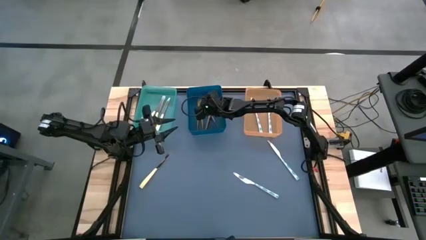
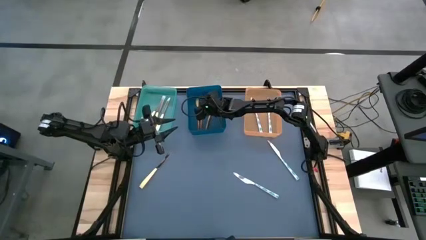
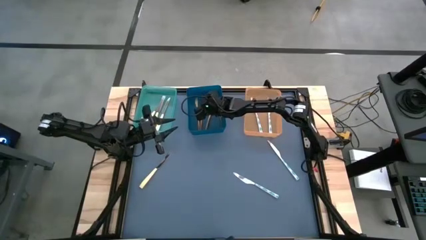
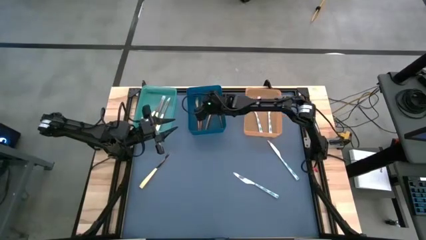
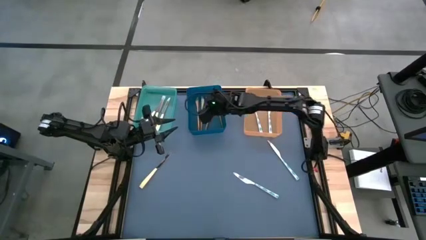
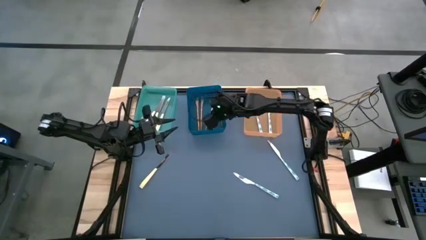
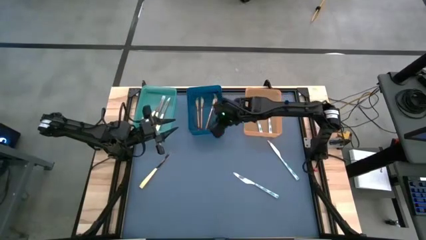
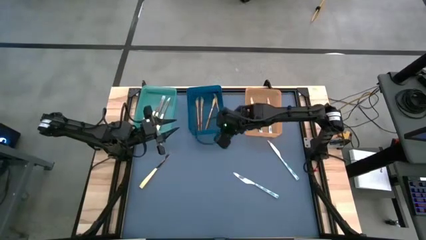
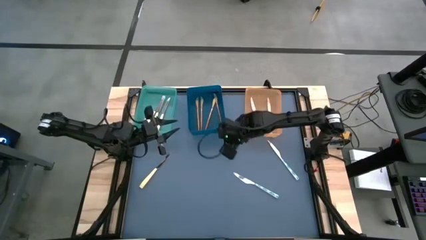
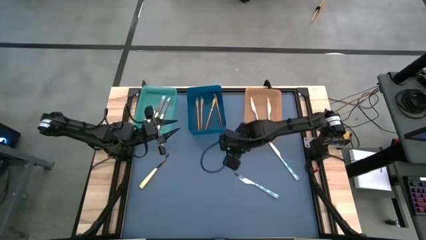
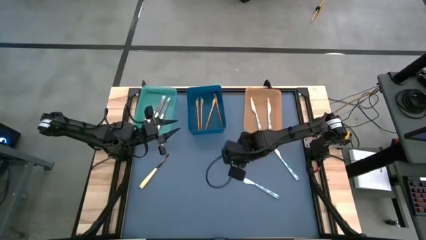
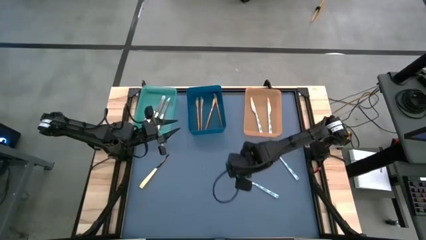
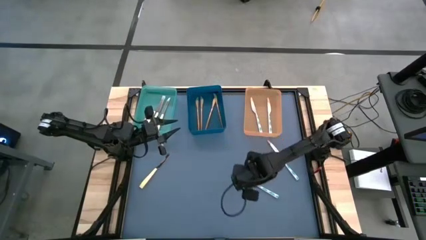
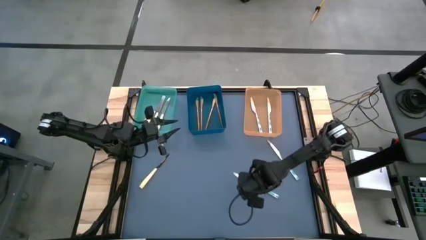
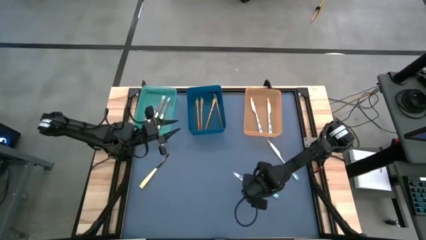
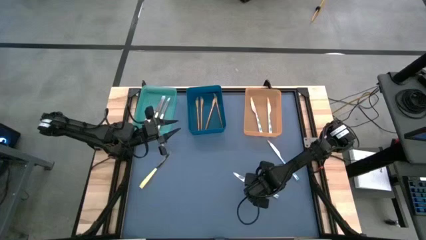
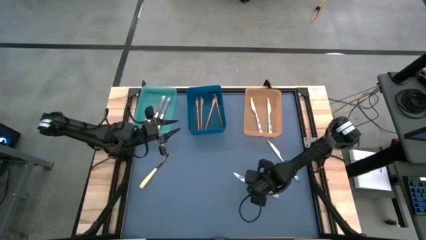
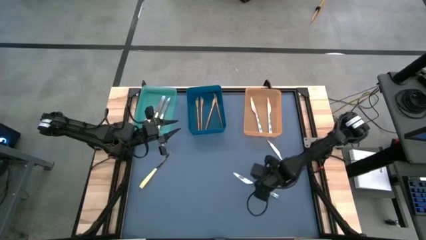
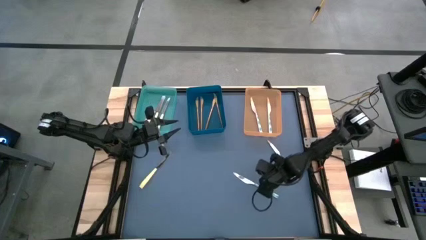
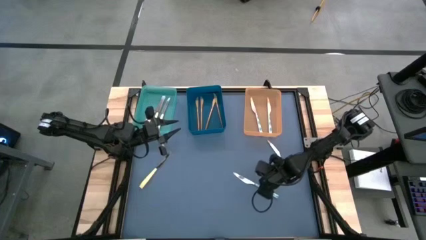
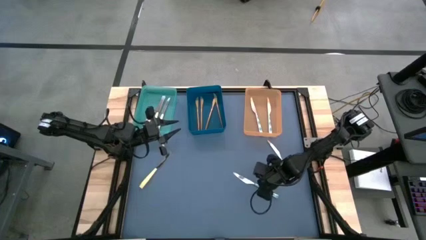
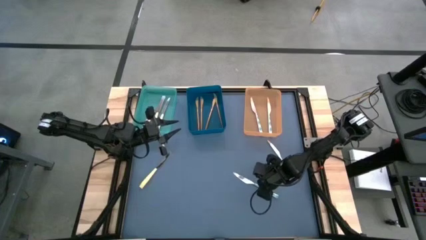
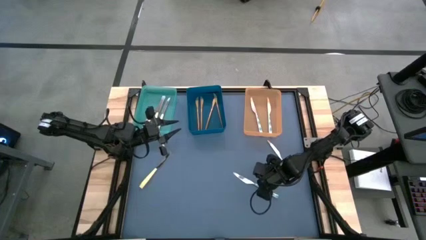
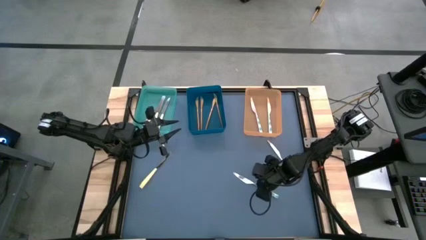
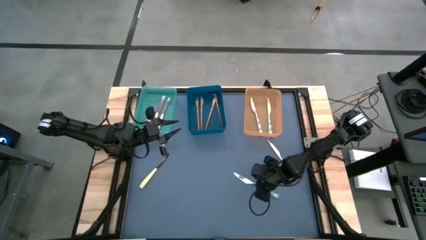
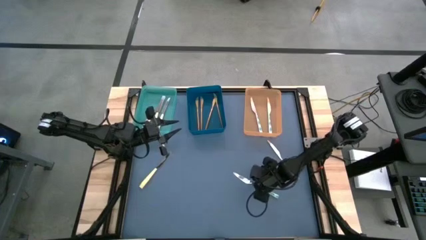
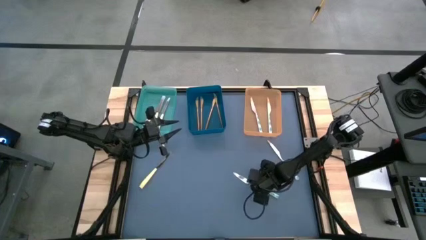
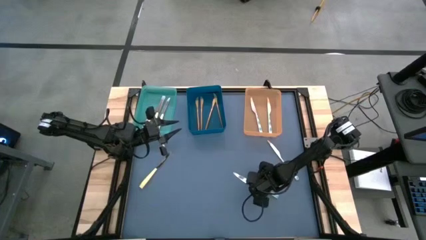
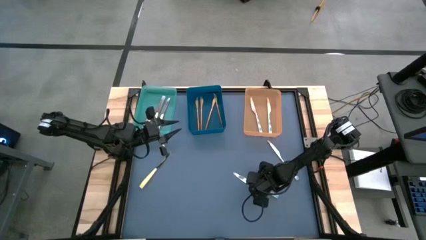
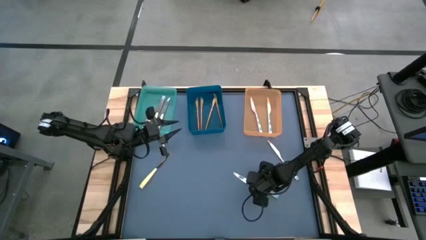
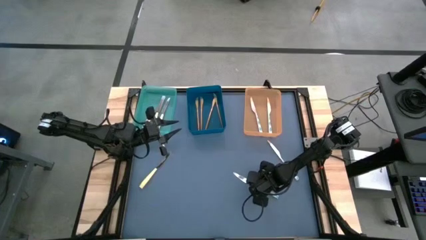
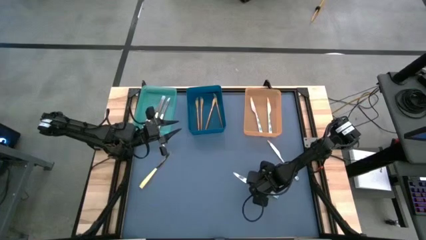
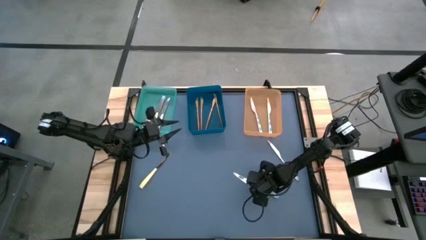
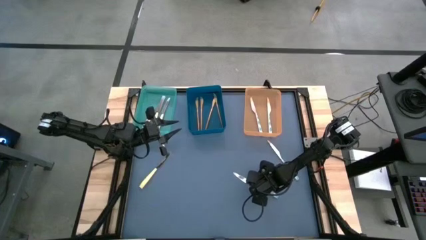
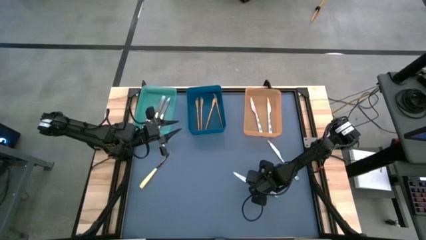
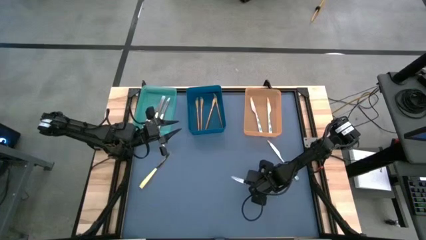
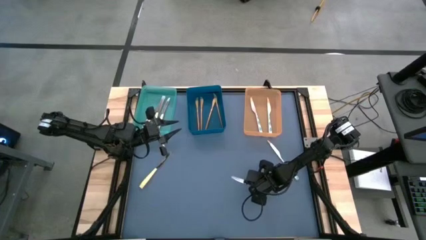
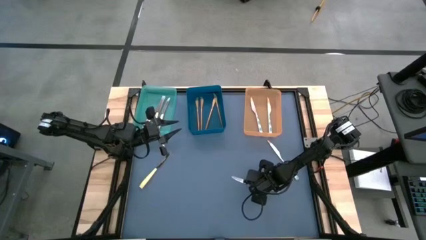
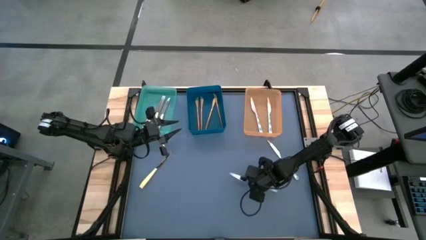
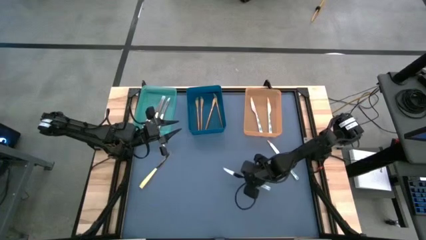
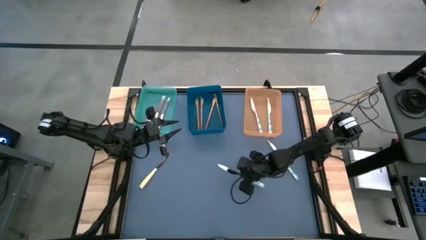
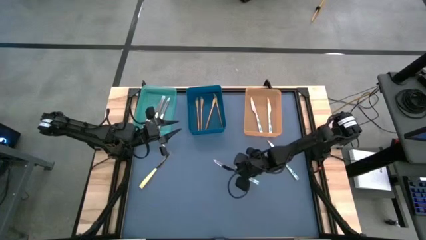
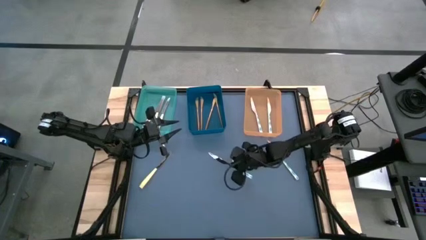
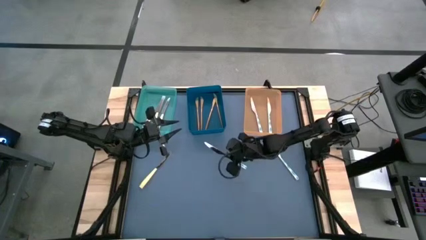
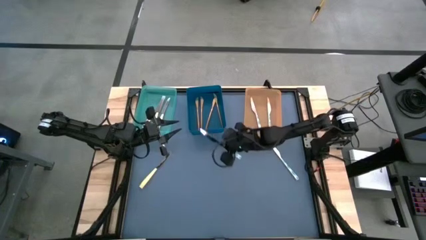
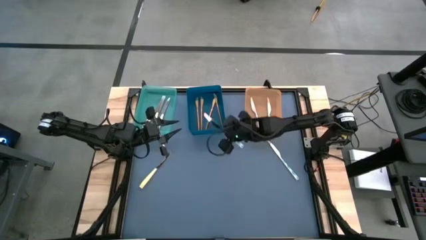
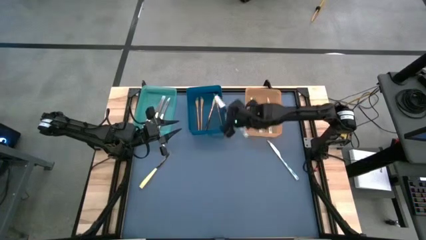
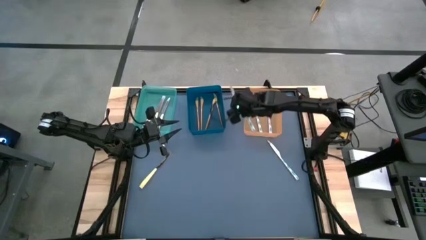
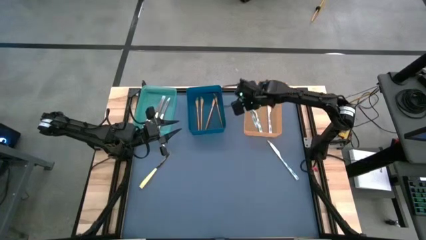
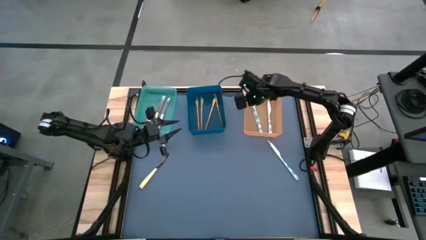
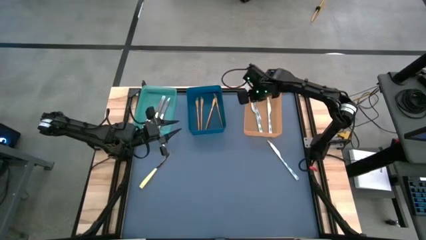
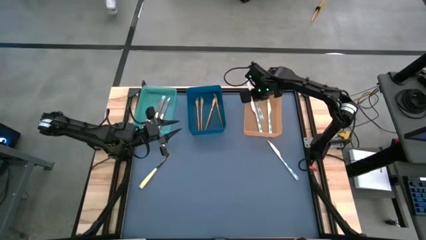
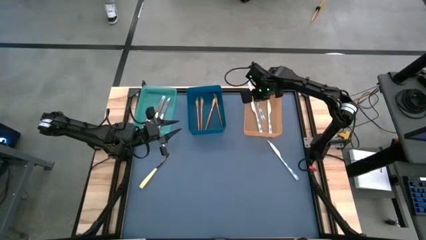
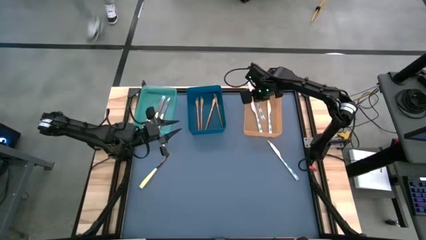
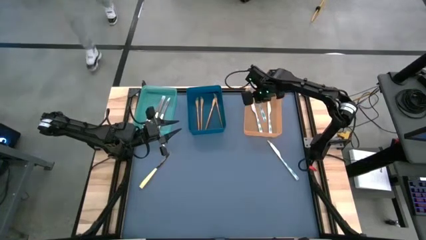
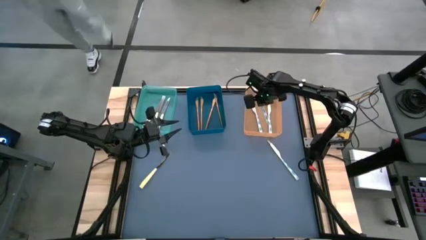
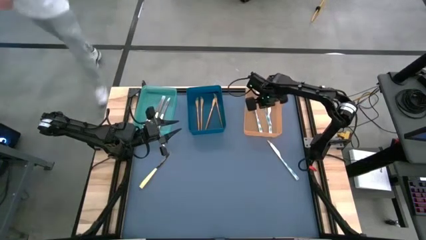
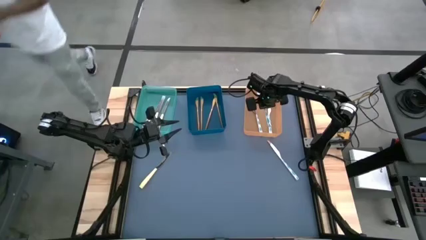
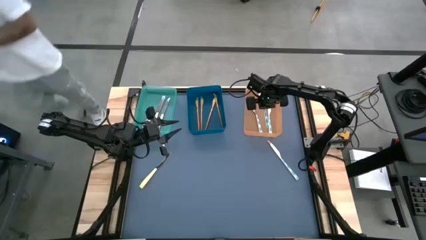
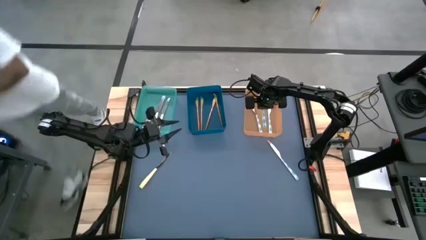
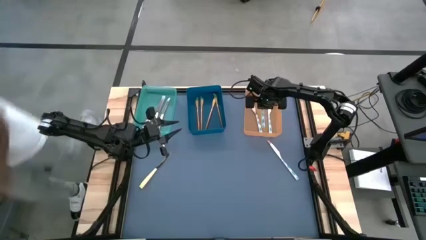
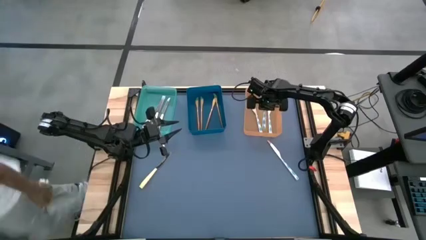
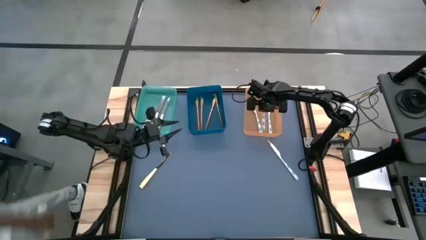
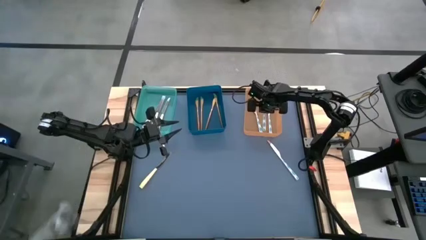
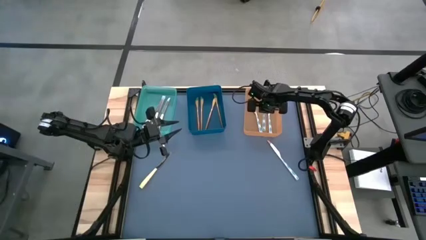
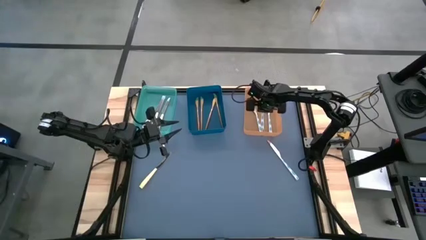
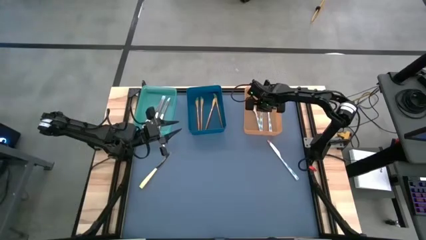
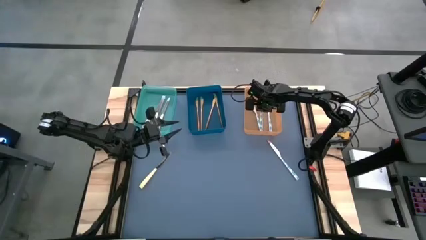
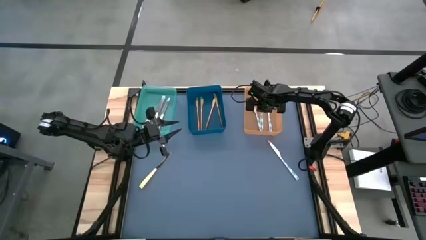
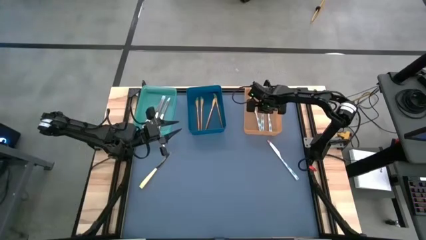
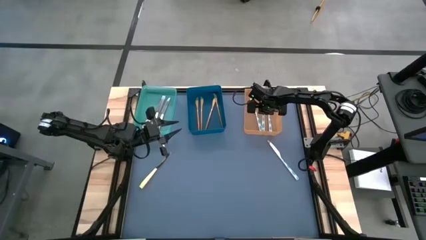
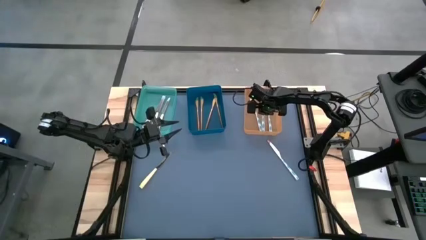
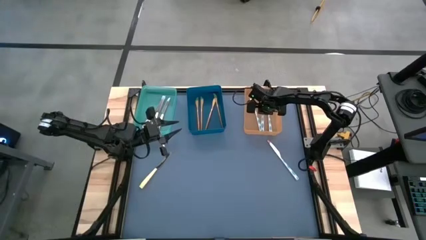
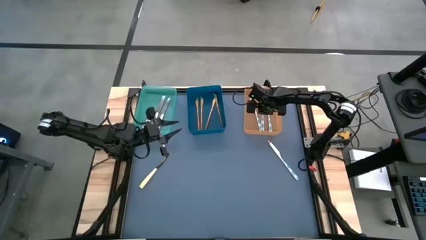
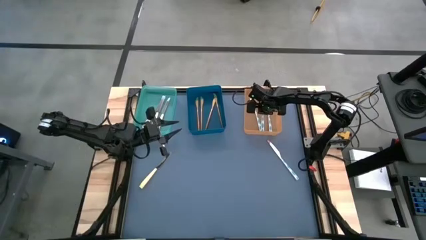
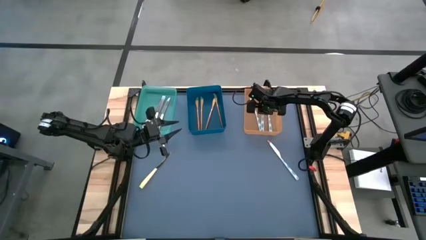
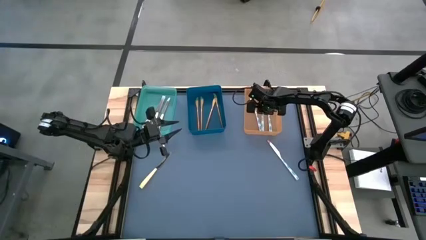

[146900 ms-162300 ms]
Task: Sort silverware by color (type)
Put the white patterned table knife into the orange bin
